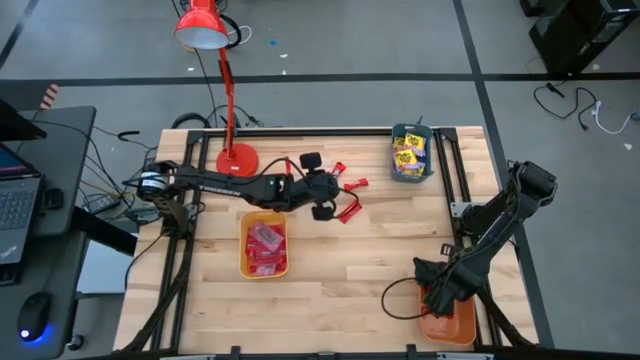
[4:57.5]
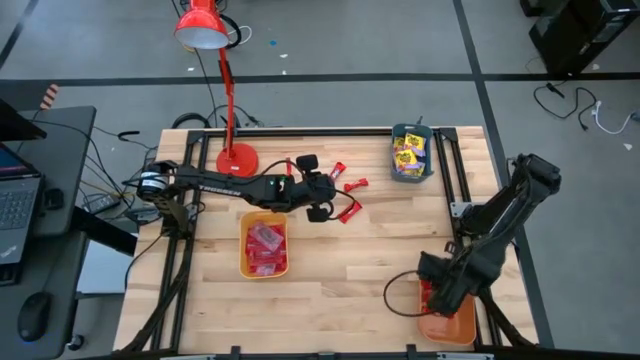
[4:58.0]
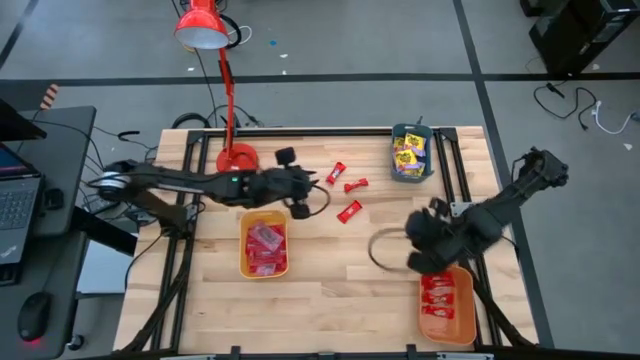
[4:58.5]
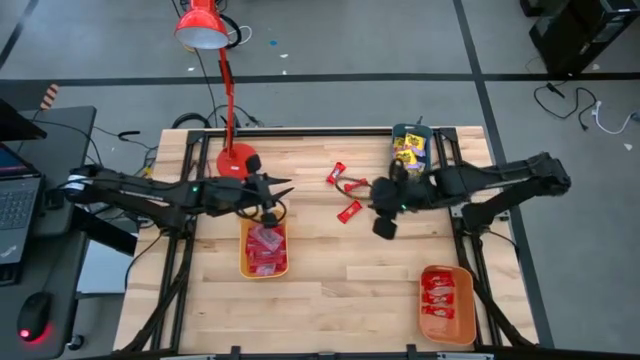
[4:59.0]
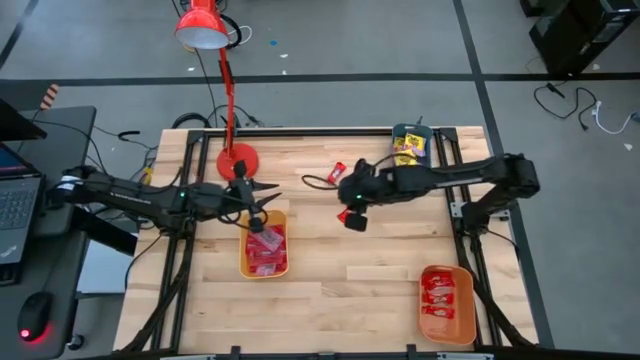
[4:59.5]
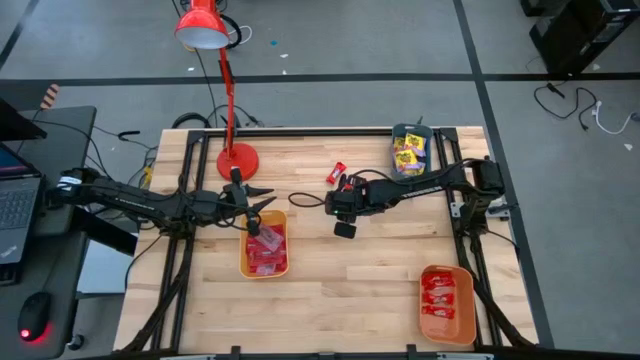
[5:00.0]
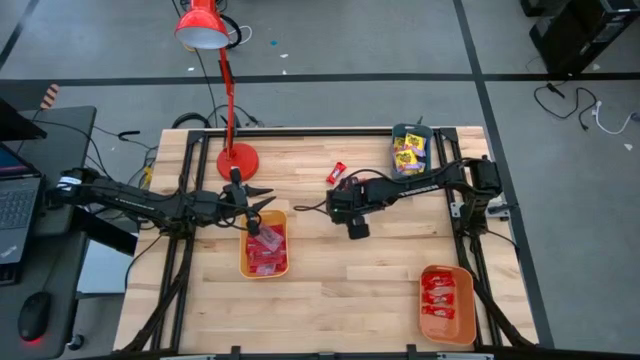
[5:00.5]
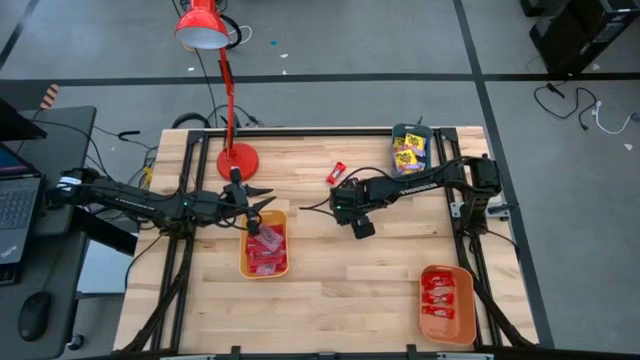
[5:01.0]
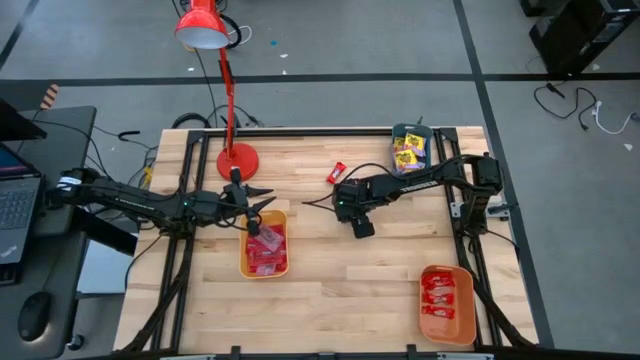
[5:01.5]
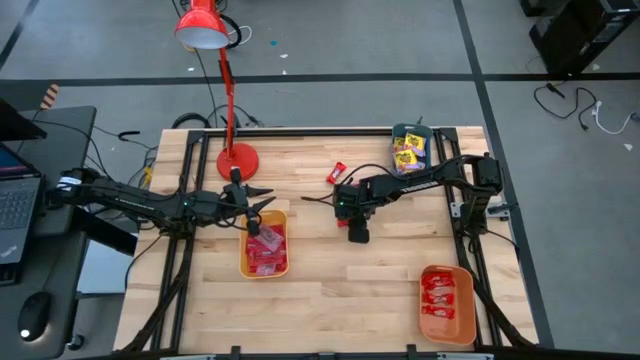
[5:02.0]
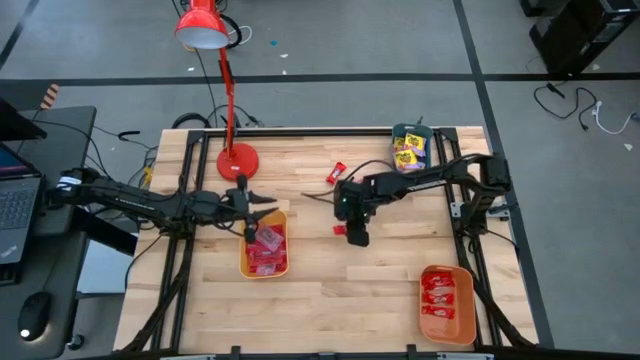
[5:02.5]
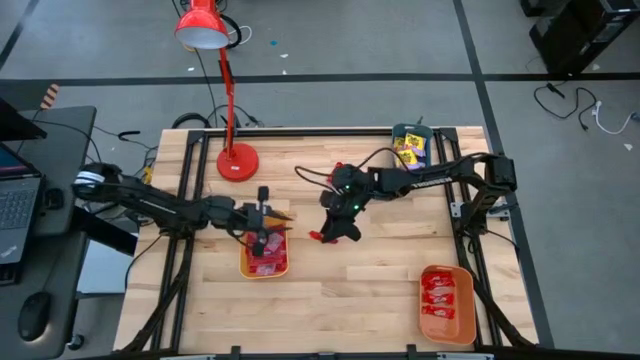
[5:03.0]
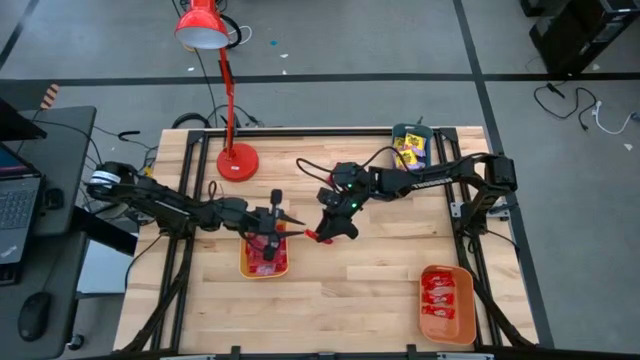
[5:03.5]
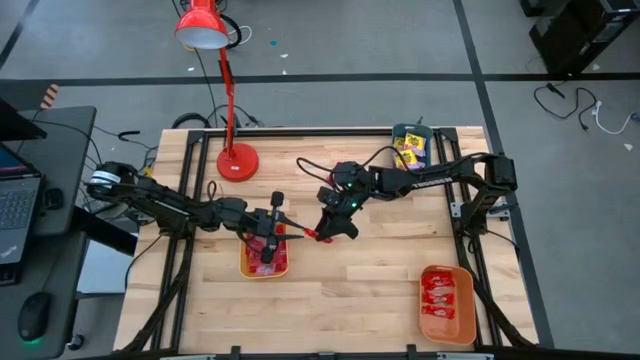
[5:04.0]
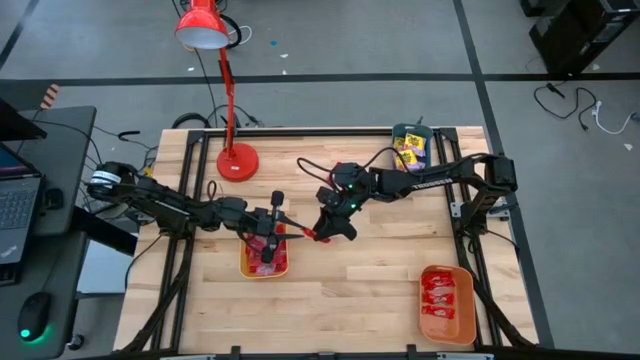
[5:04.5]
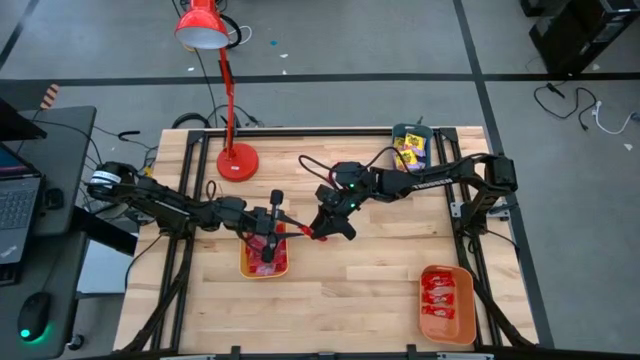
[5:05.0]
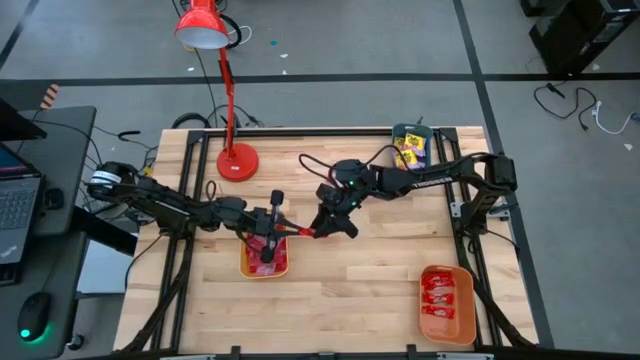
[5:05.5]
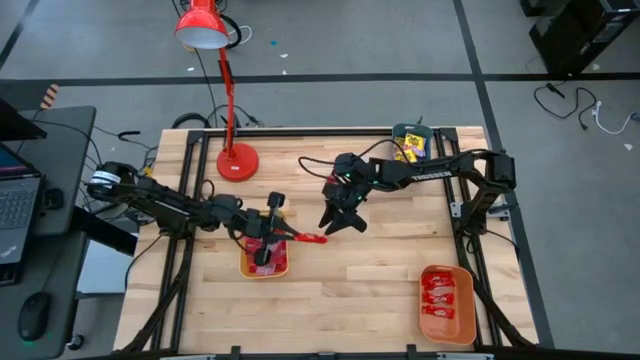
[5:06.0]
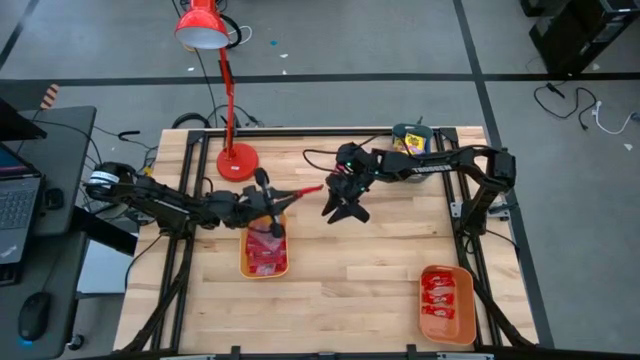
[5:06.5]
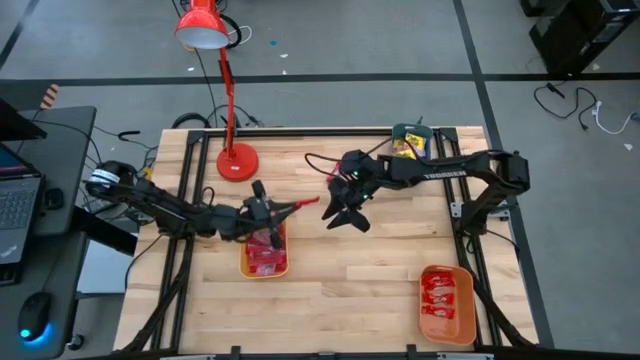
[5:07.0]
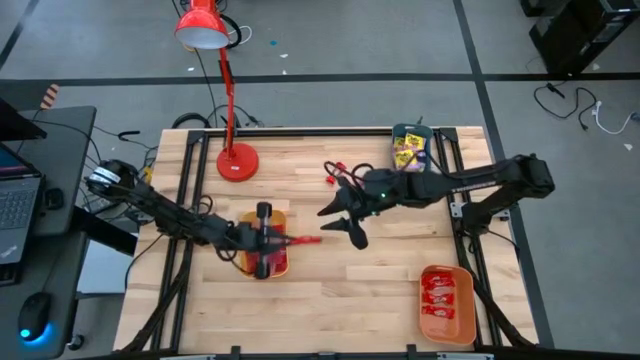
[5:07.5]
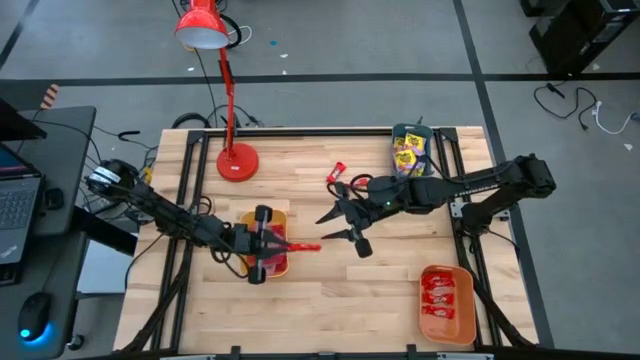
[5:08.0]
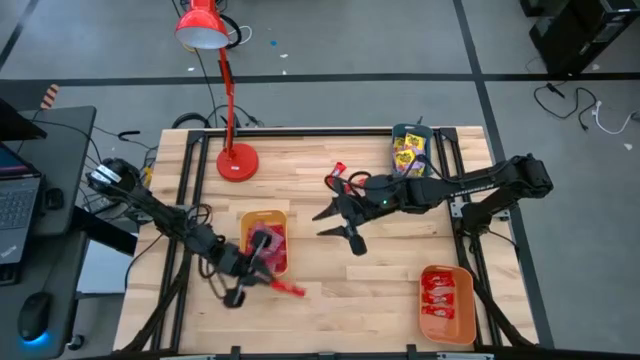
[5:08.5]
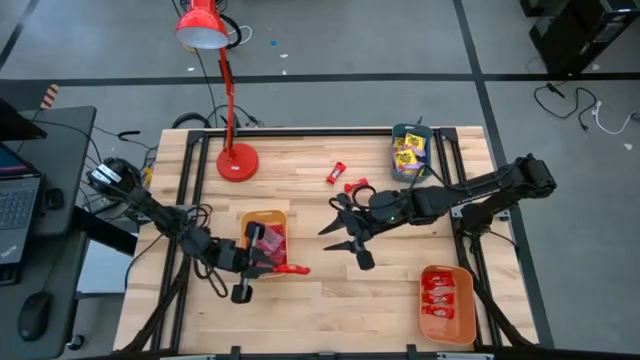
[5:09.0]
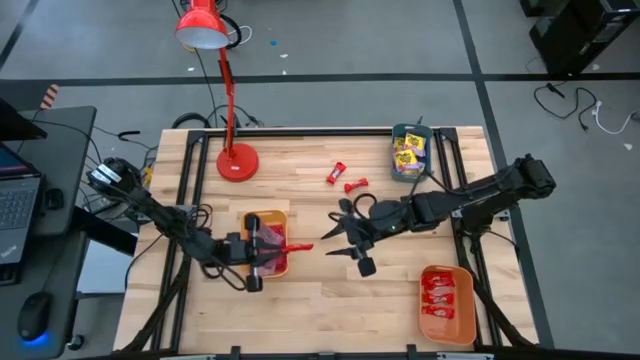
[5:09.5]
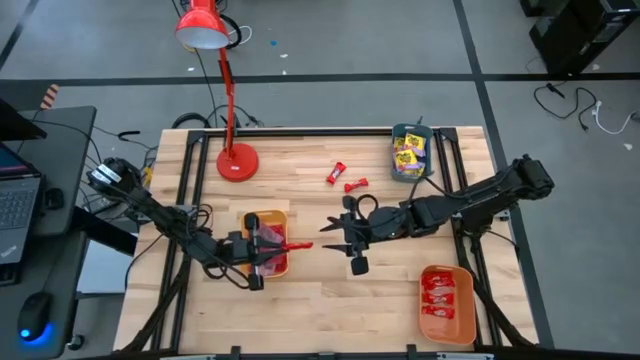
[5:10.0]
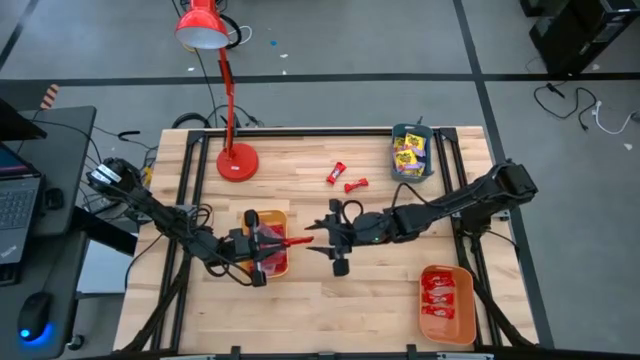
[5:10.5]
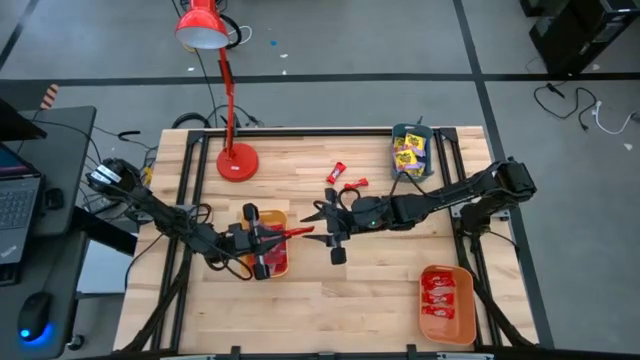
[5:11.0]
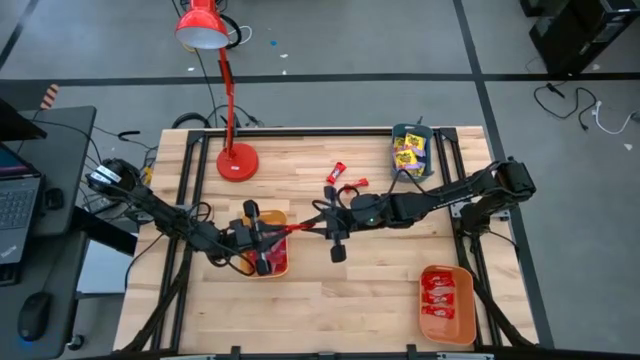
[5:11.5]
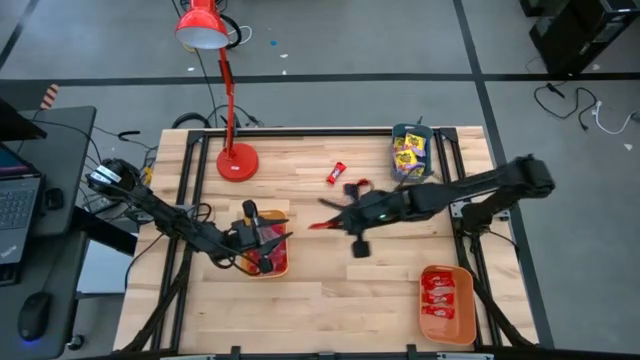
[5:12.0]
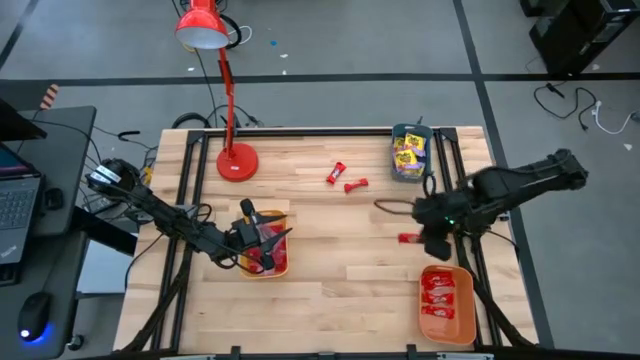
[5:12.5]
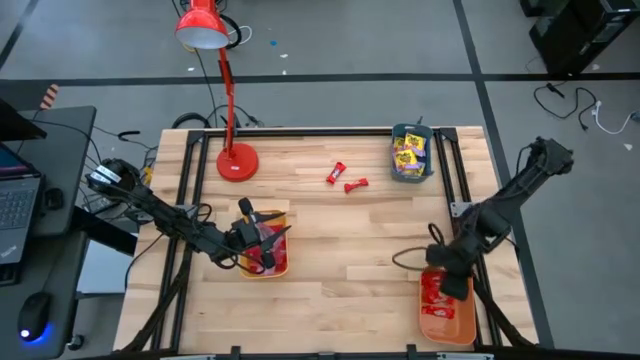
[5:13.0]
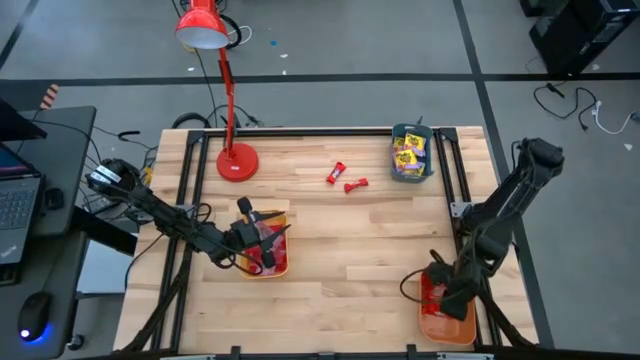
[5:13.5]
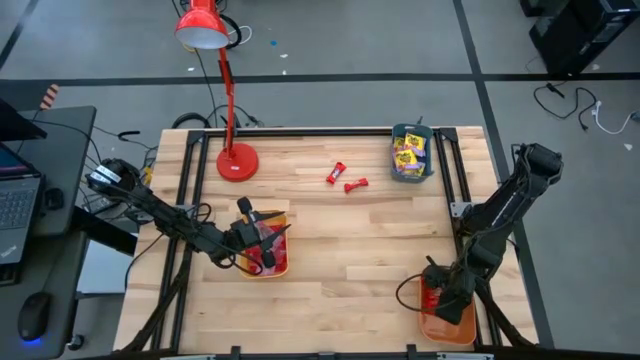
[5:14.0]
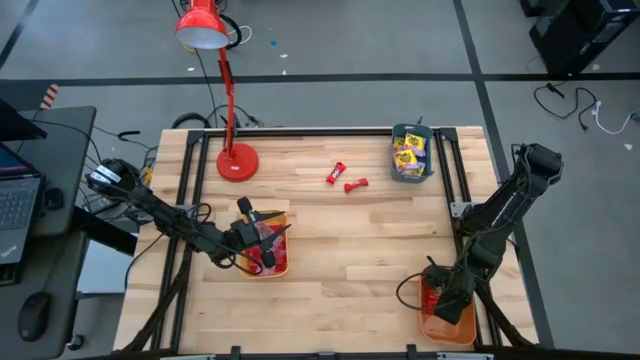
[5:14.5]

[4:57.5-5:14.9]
Task: Sort candy
Put the red chocolate into the orange bin

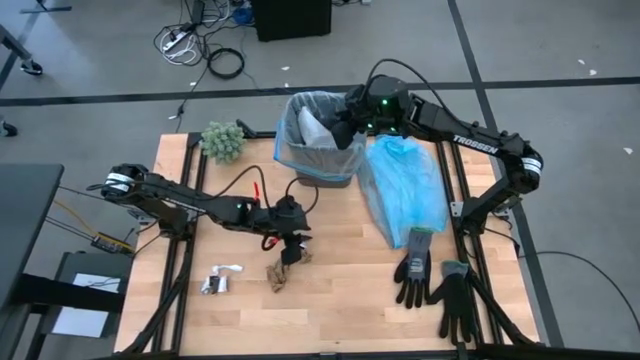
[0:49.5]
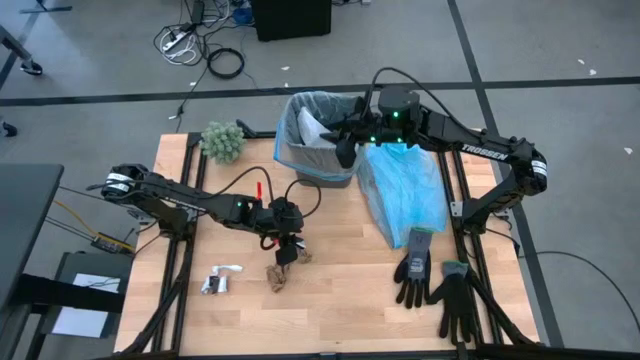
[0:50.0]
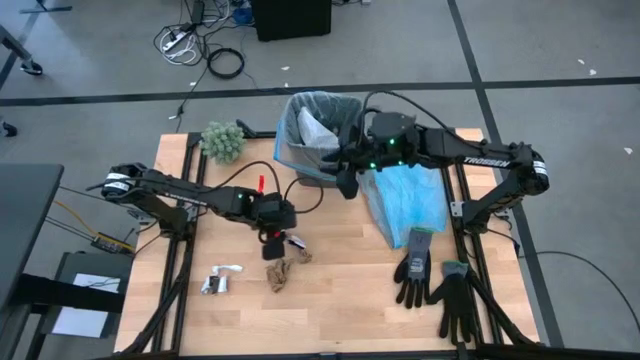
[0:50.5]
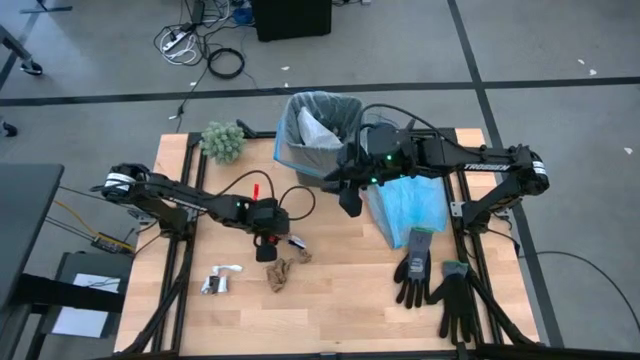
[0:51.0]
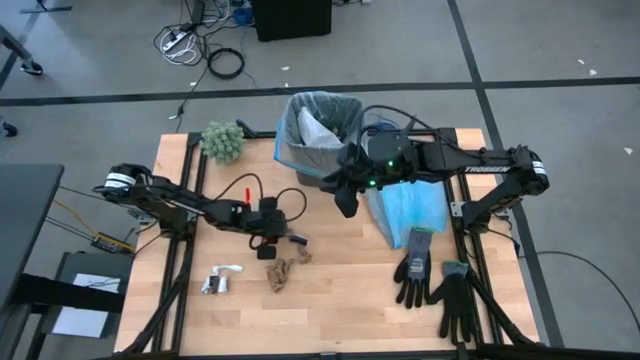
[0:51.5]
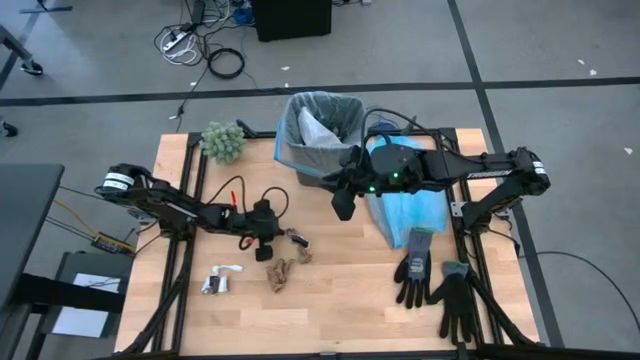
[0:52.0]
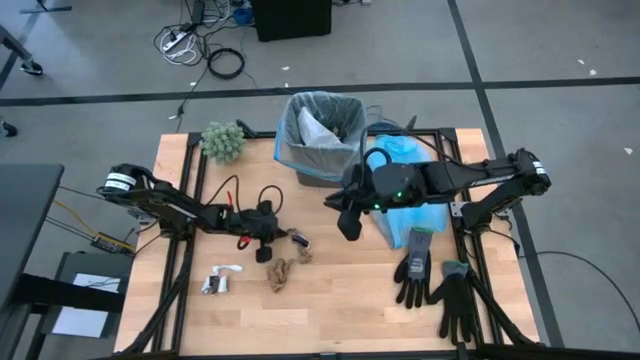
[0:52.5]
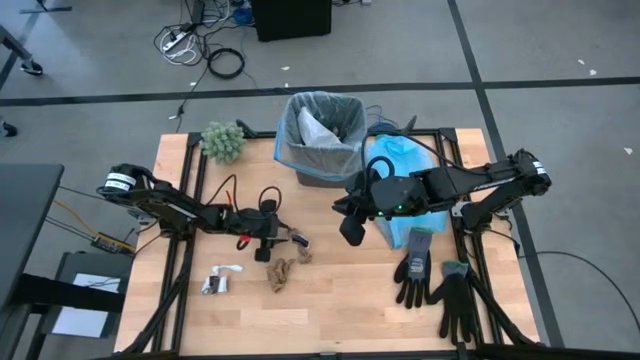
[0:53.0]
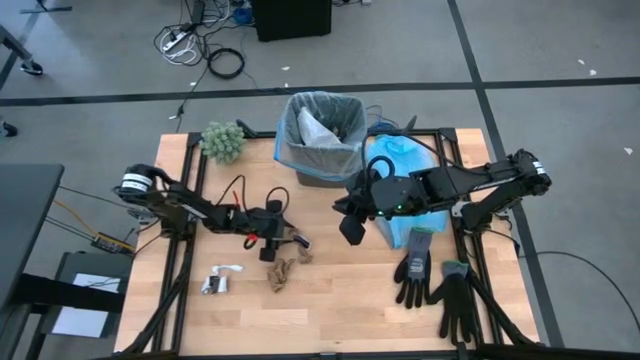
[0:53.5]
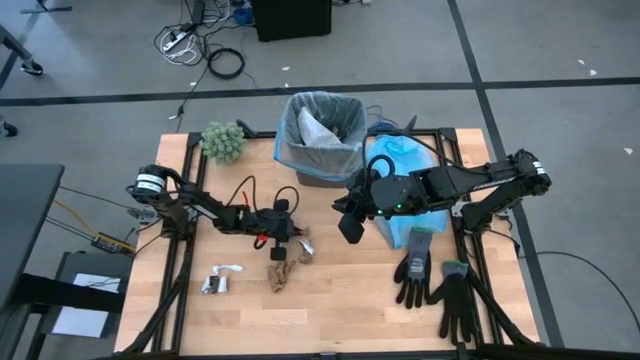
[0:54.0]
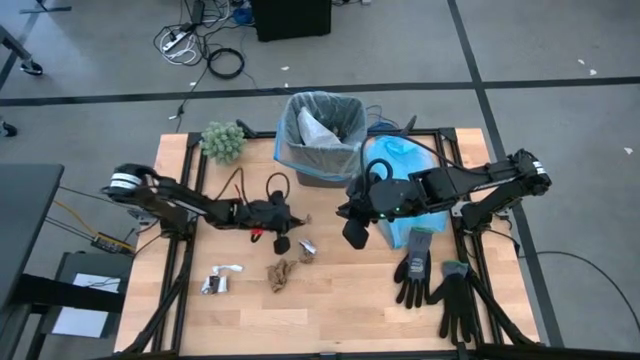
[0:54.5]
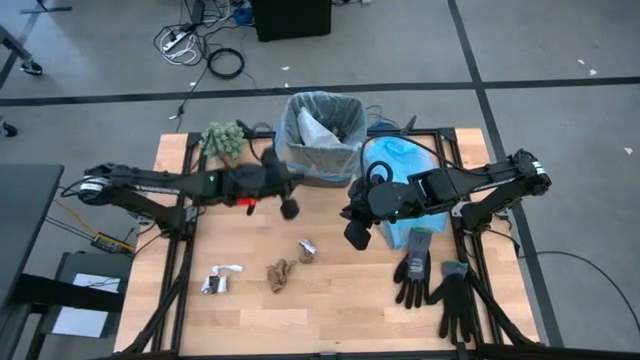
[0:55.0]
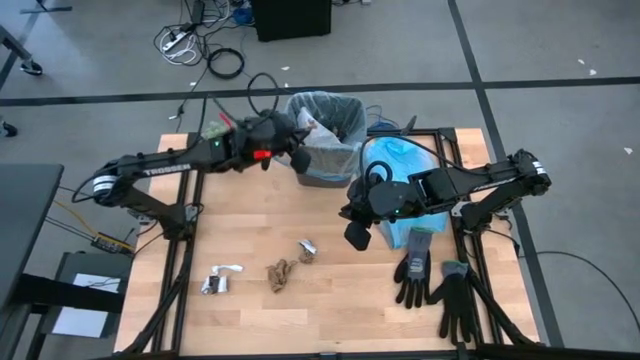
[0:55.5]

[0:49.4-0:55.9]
Task: place trash/remove bag and relplace
Put the brown napkin into the trash bin
